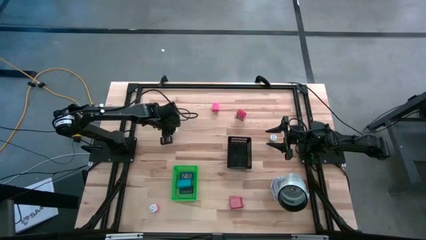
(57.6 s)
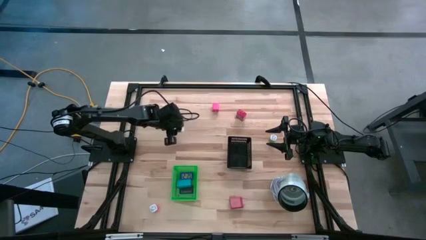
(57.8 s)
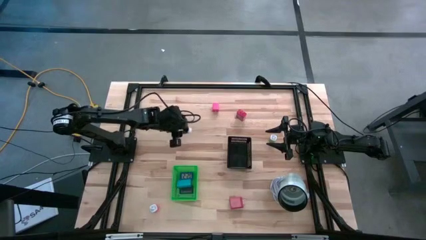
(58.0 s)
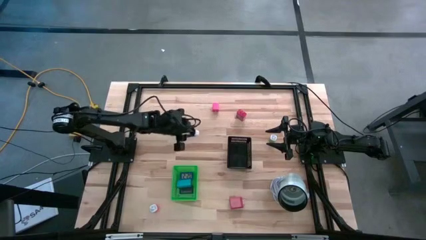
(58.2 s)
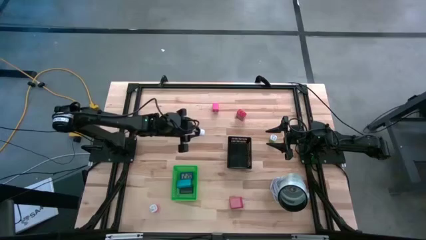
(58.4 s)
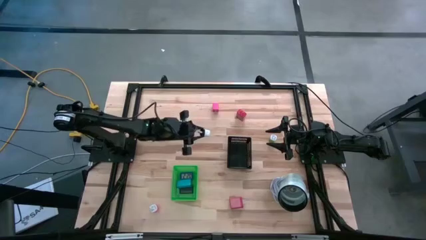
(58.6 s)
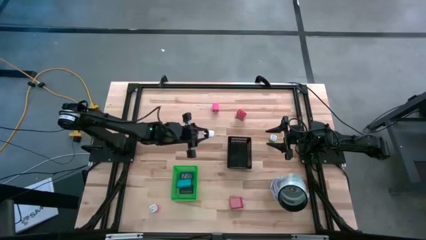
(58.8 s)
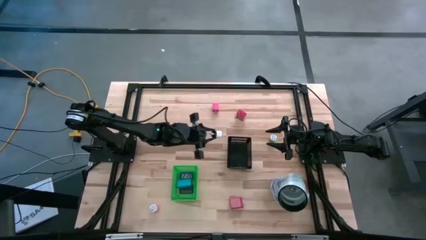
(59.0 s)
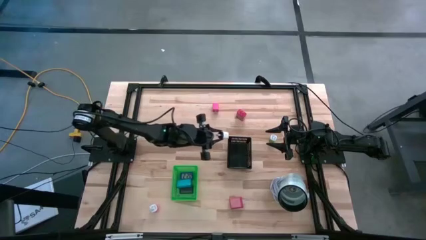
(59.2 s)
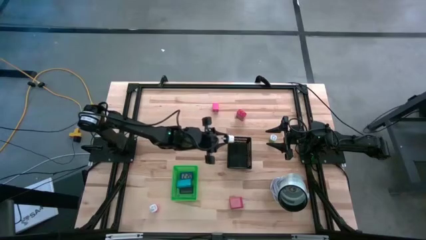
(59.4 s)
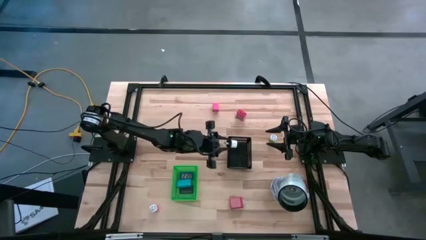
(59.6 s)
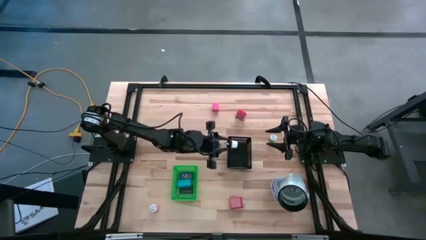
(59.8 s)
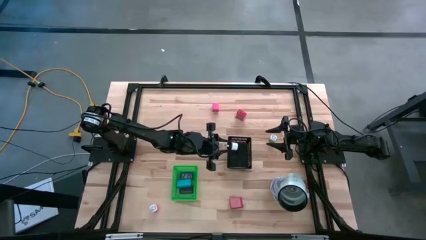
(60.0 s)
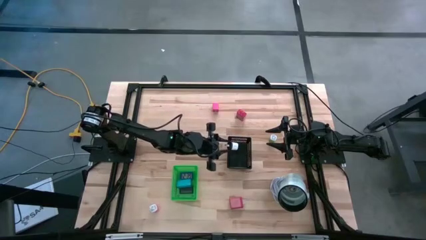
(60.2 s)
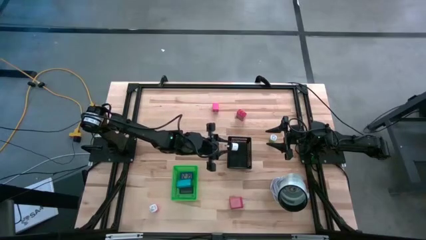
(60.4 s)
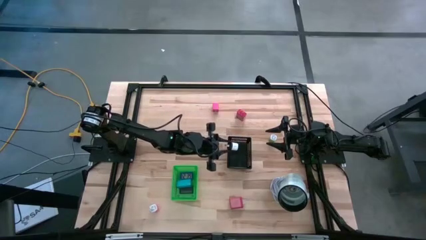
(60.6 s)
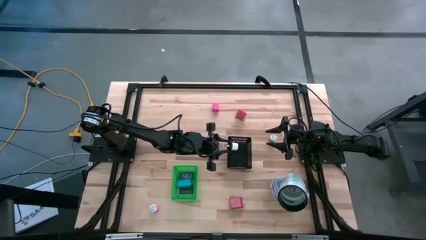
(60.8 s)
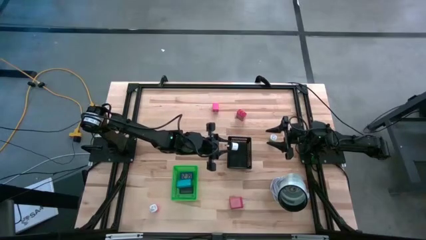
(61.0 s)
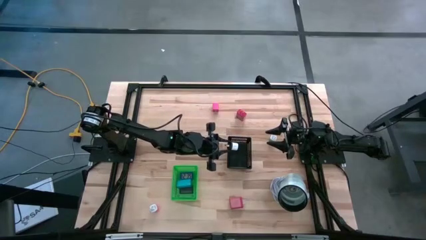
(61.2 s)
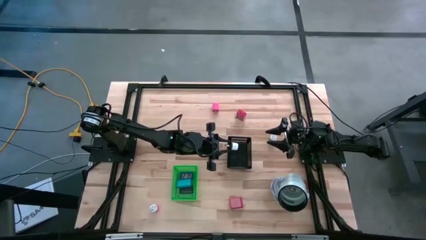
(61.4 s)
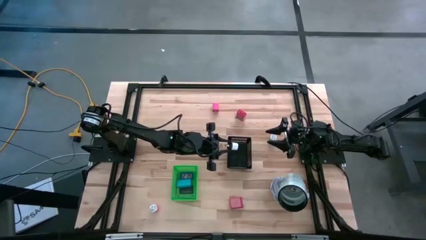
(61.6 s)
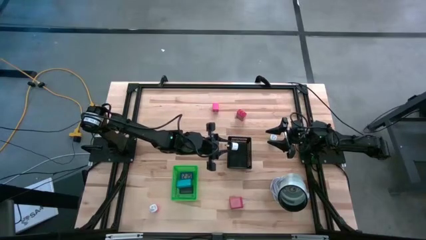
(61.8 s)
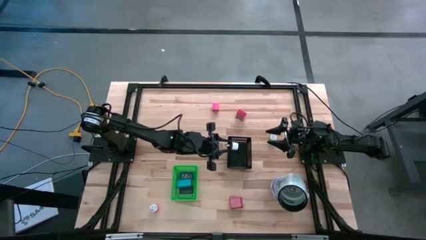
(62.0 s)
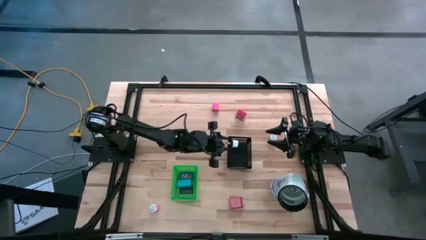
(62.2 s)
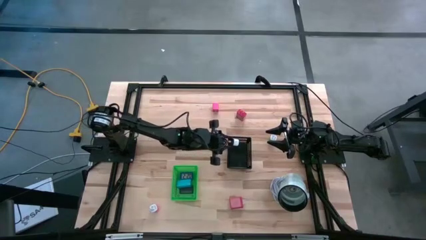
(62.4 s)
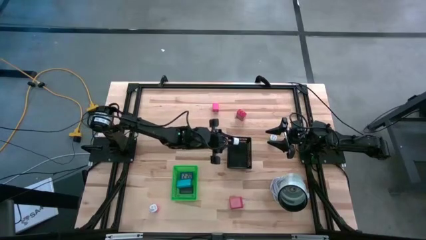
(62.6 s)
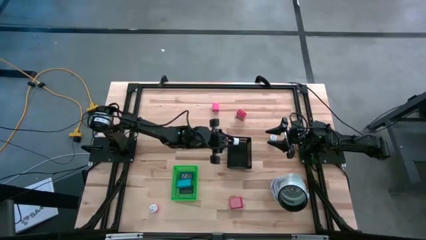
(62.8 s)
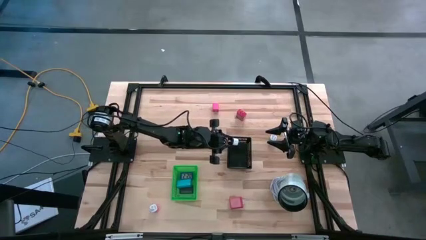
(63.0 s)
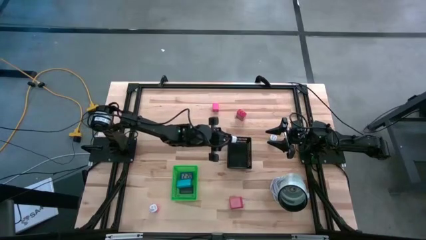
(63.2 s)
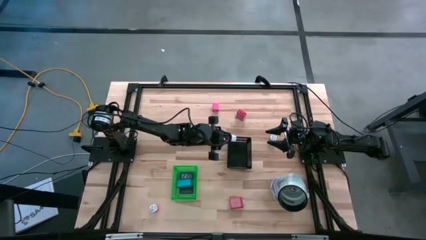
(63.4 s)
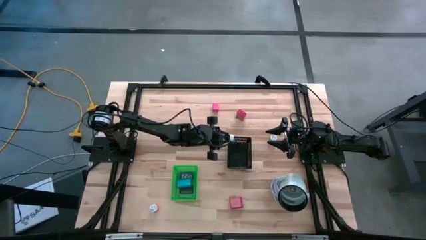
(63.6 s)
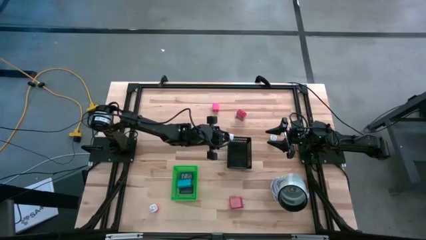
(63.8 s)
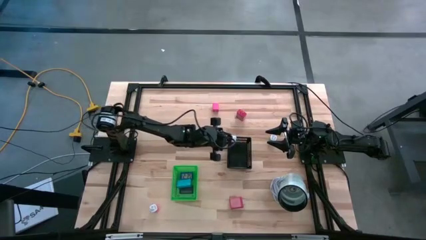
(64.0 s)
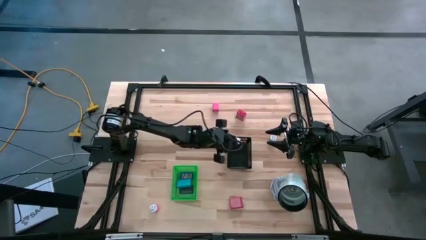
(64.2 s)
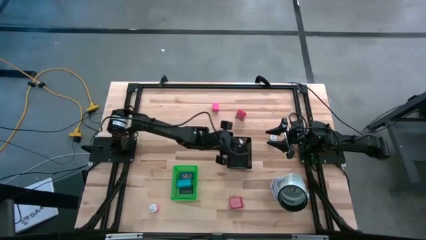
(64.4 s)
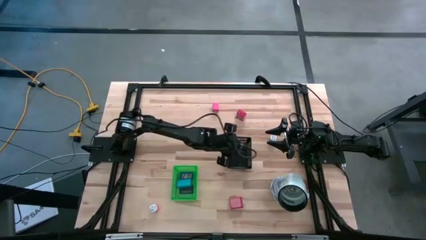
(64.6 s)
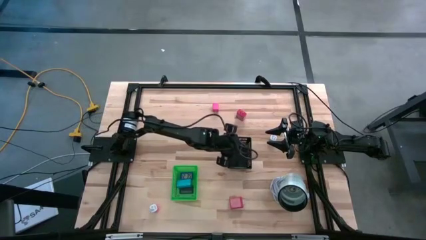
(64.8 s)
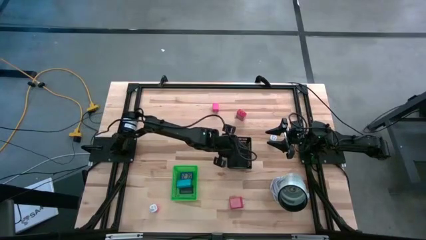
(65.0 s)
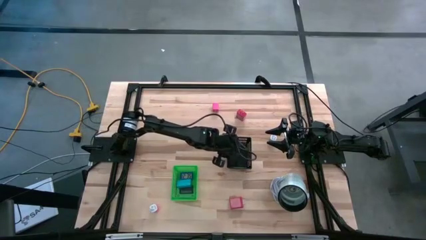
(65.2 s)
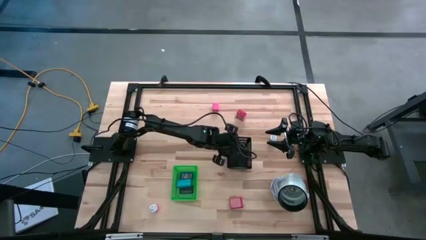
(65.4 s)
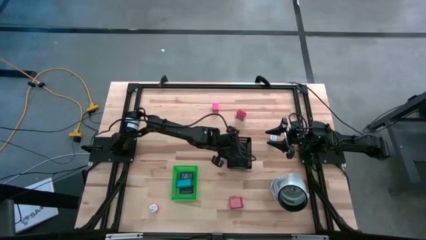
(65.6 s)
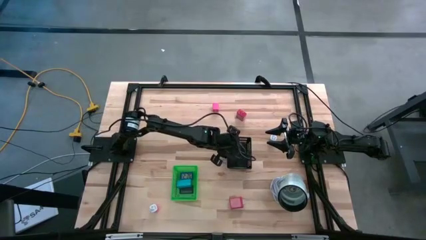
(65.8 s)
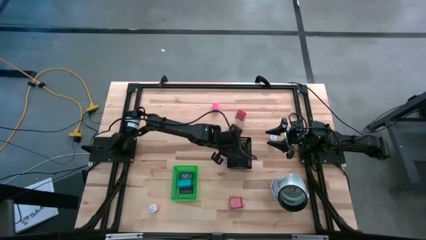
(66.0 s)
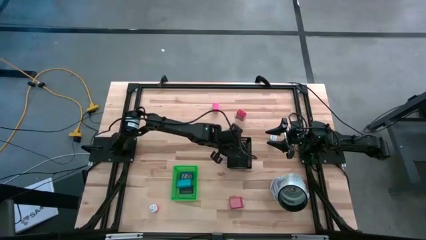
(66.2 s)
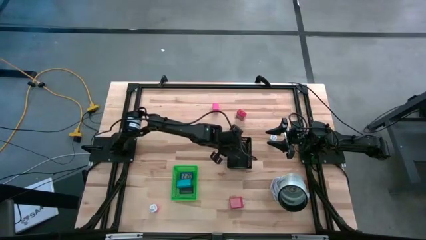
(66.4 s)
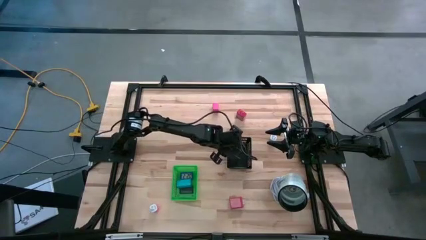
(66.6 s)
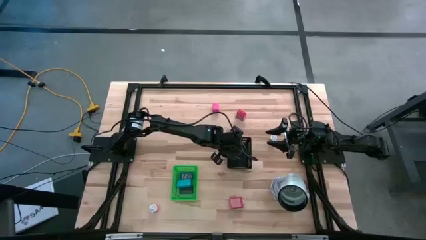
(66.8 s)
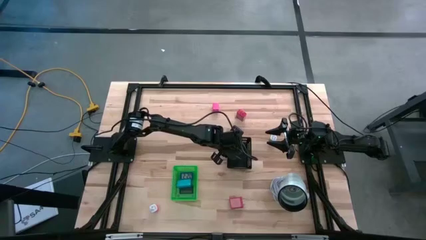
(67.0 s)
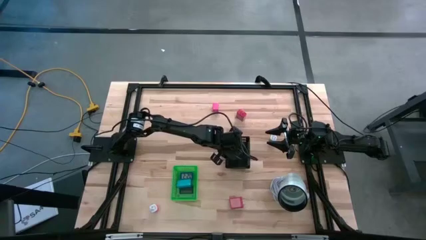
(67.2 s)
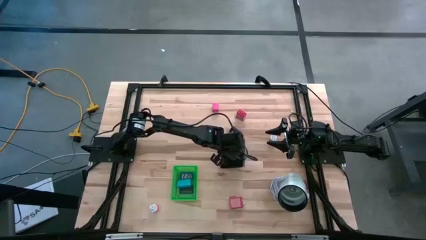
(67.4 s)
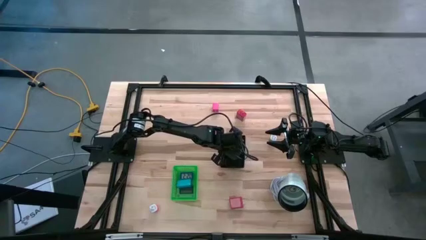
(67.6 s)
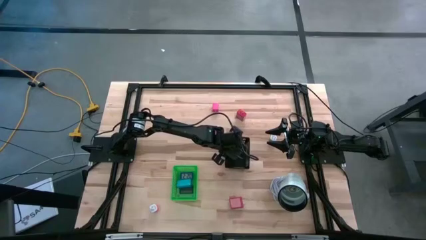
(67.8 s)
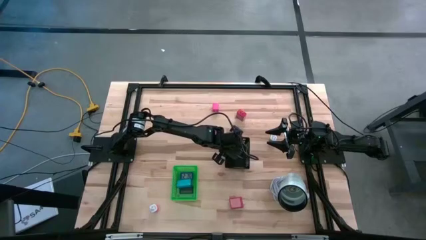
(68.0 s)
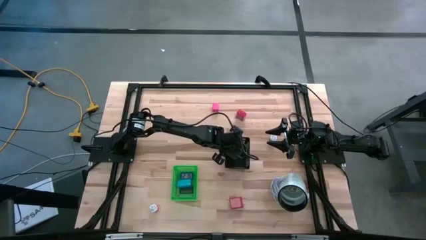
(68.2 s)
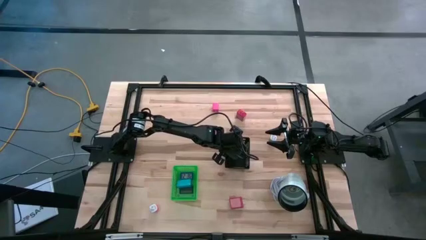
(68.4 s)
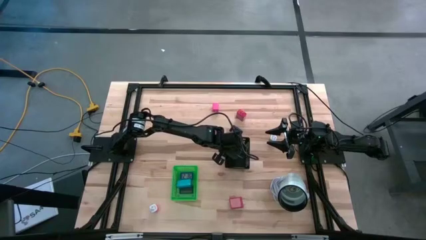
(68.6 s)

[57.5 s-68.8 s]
Task: Pick & Place Office items
Put the white charger adapter into the black bin
